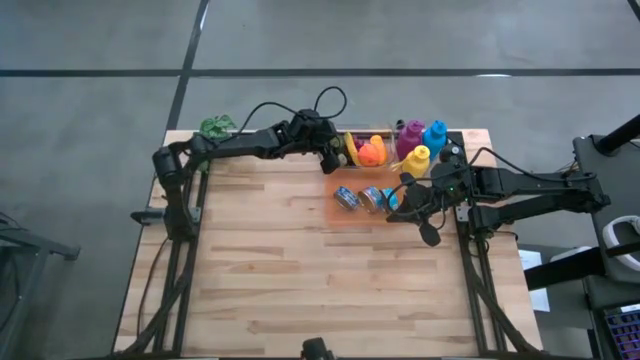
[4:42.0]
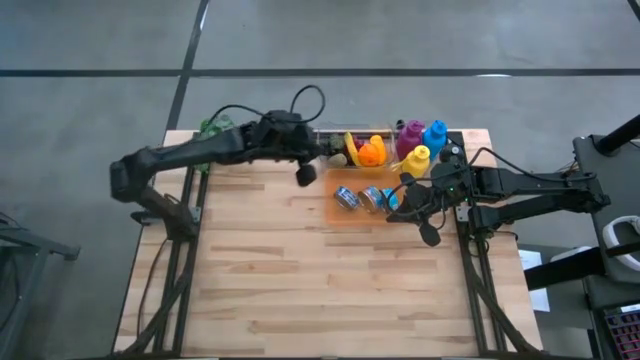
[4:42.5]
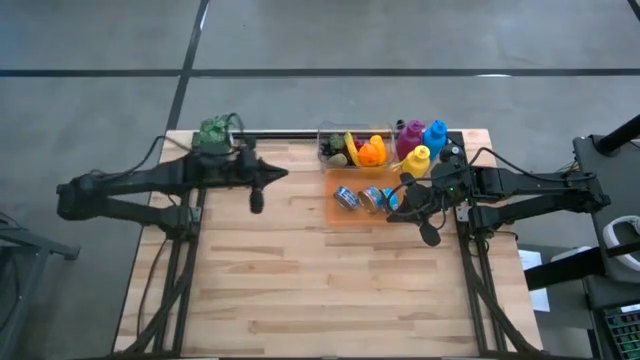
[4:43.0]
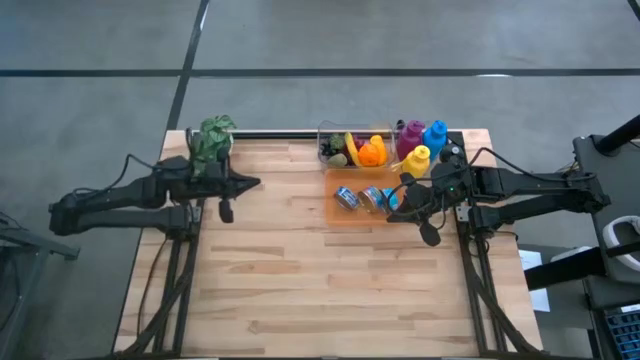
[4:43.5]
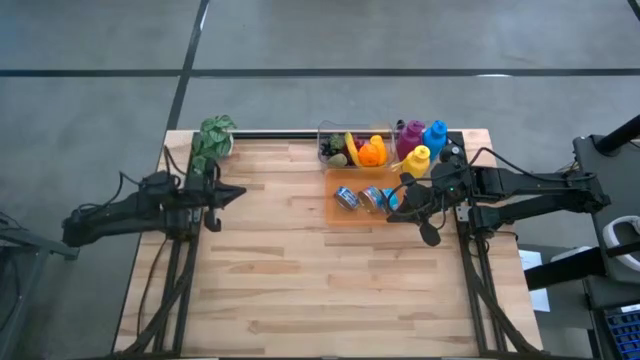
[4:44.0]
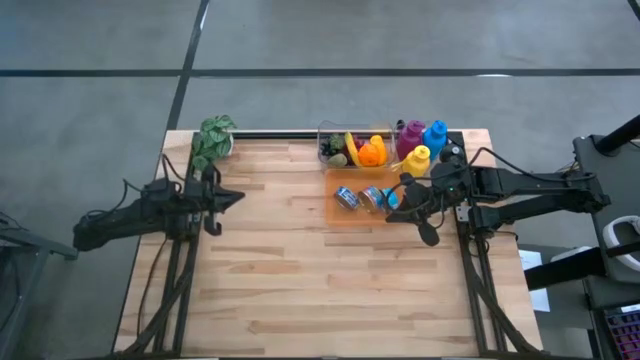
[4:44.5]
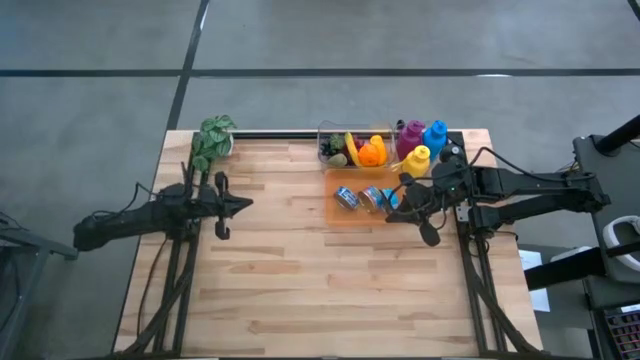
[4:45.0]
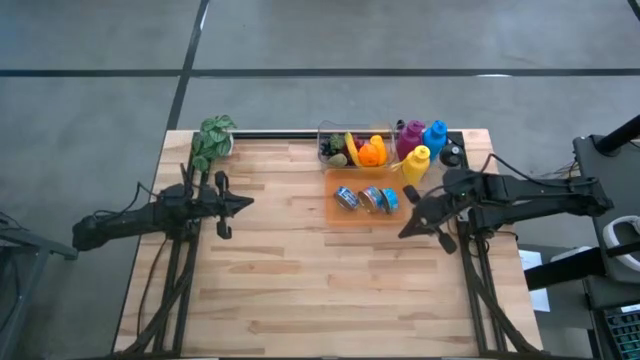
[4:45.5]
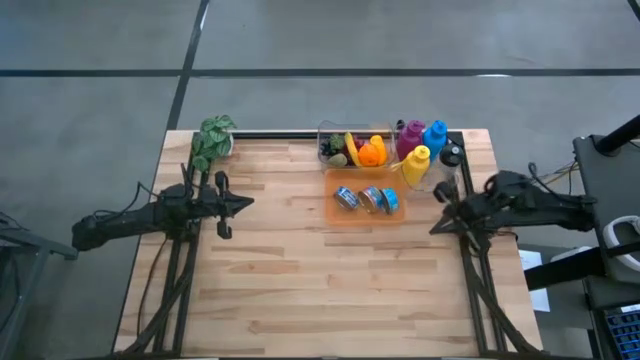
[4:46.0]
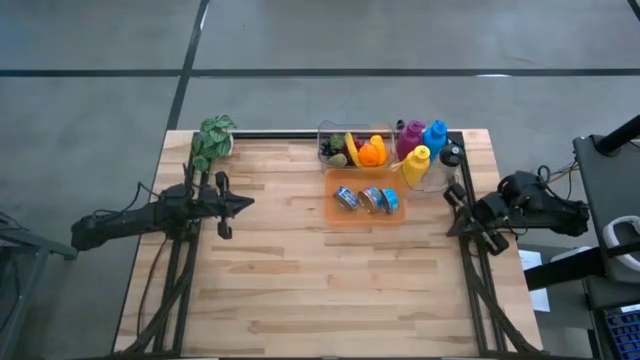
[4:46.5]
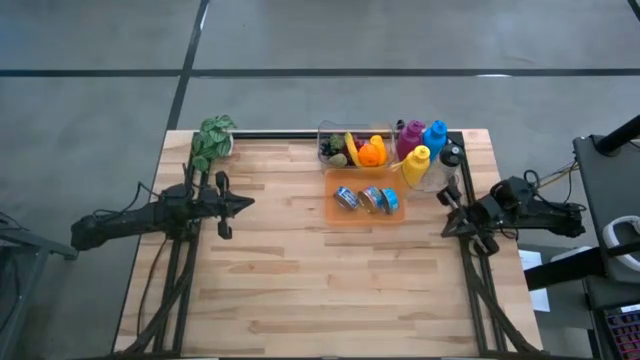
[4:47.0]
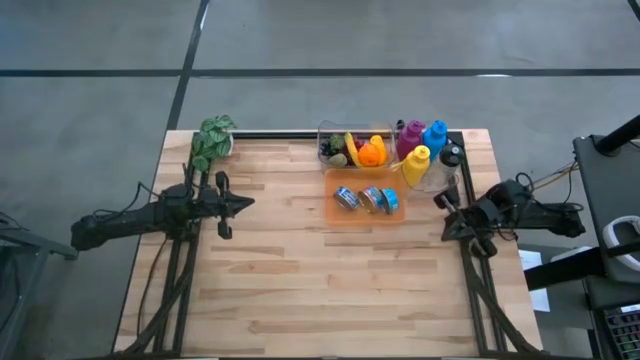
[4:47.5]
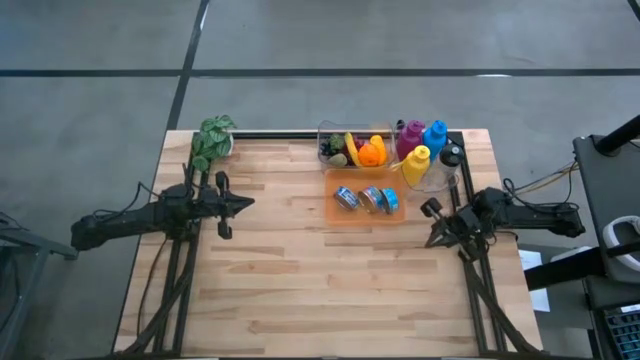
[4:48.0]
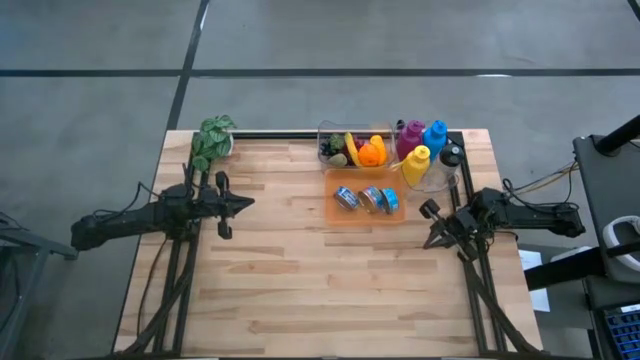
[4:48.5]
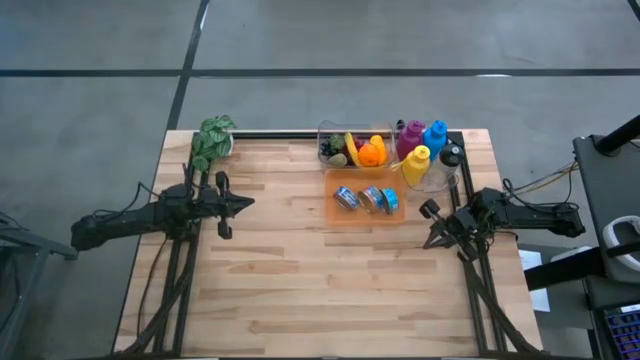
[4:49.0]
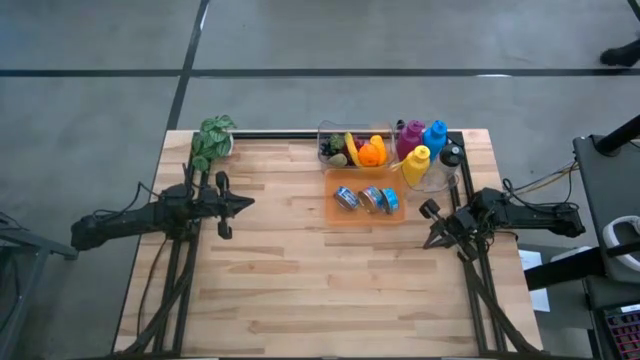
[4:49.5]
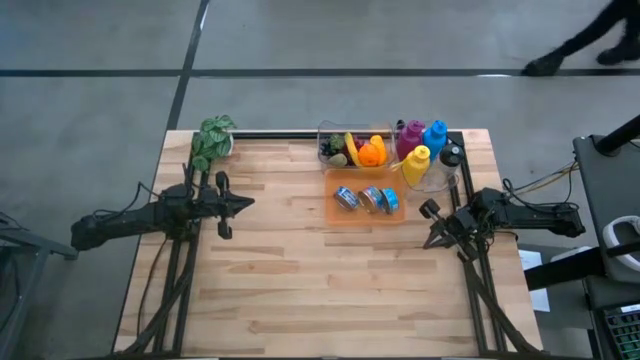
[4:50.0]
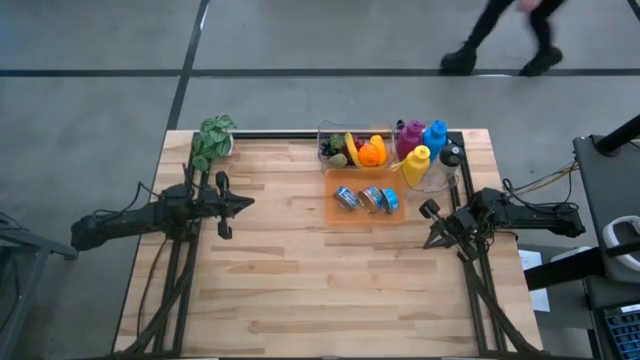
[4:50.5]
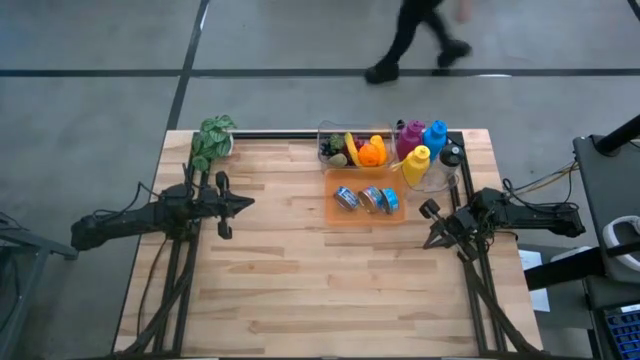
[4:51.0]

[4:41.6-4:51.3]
Task: Pick & Place Food Item
Return to Home Position

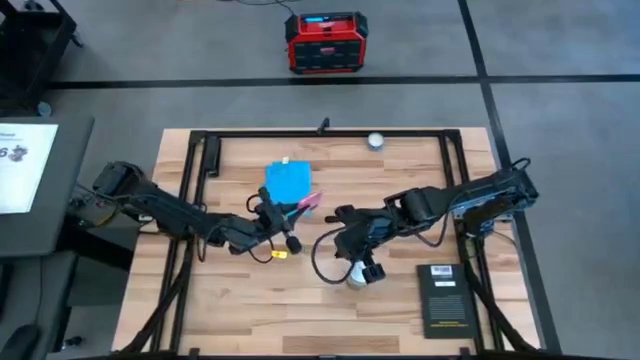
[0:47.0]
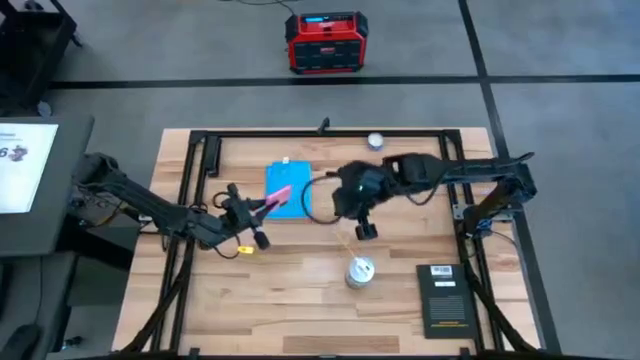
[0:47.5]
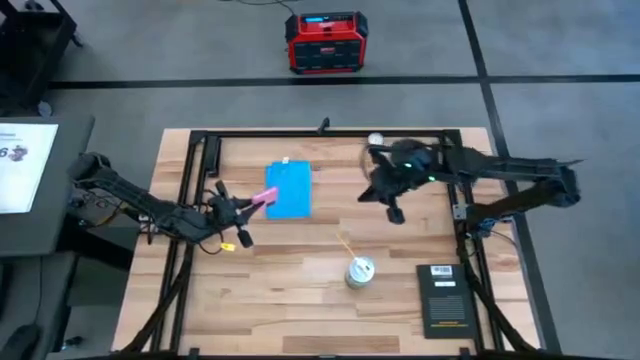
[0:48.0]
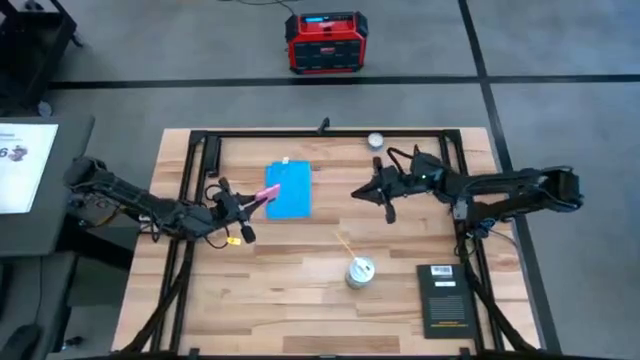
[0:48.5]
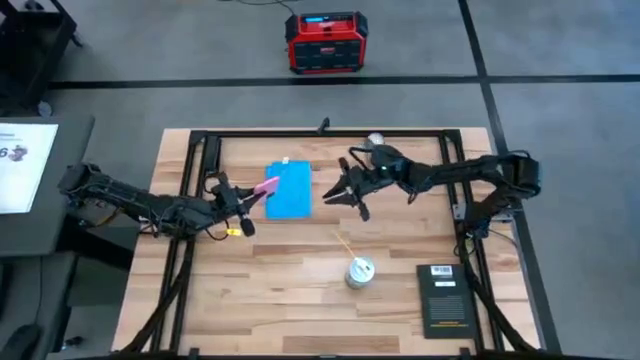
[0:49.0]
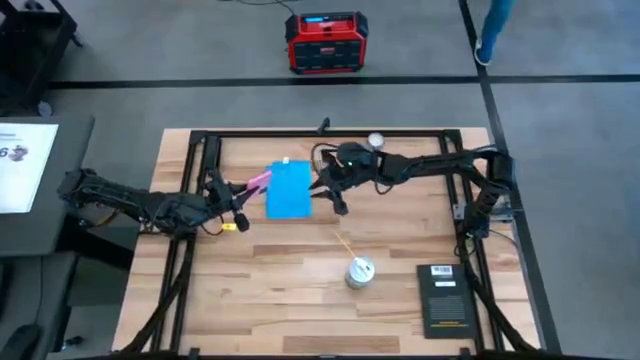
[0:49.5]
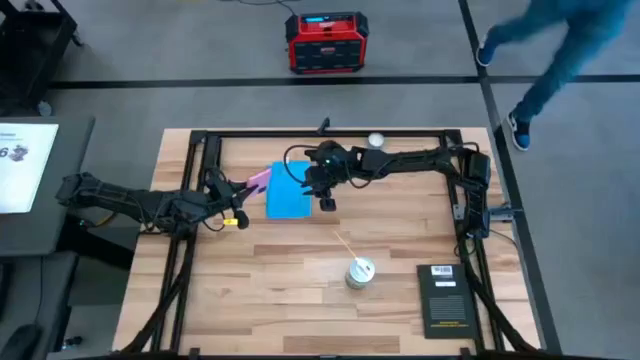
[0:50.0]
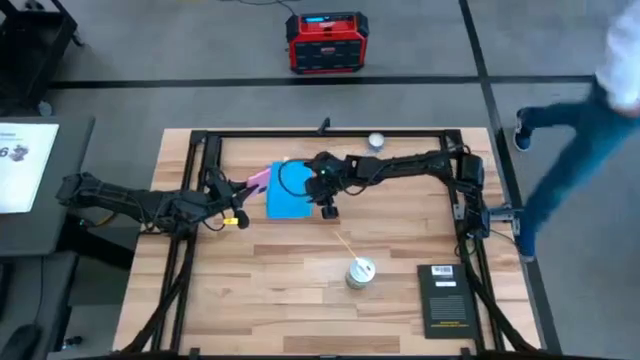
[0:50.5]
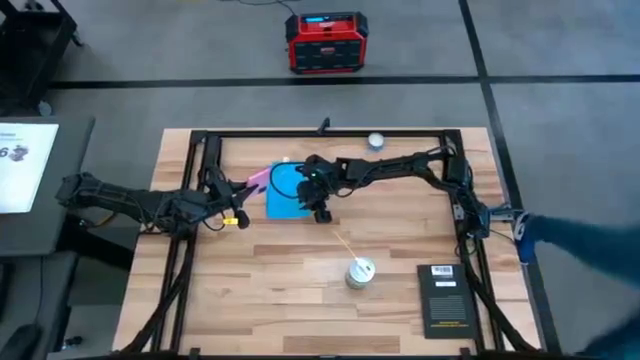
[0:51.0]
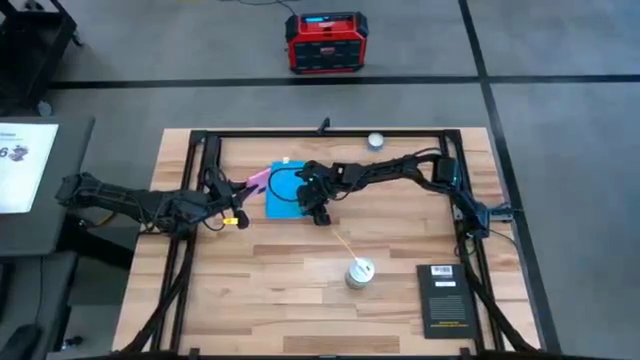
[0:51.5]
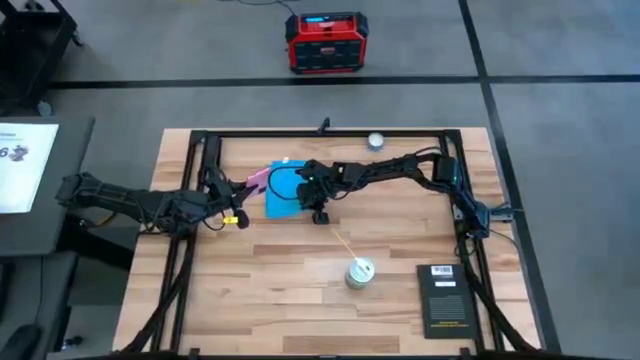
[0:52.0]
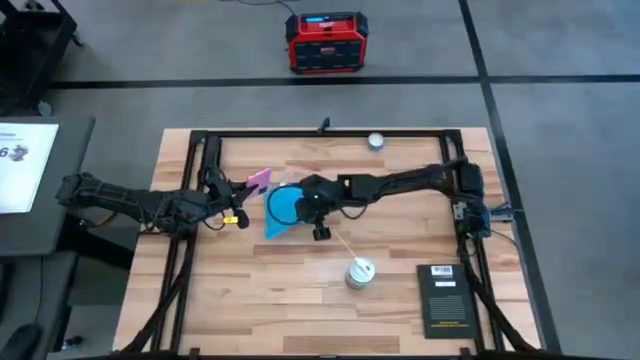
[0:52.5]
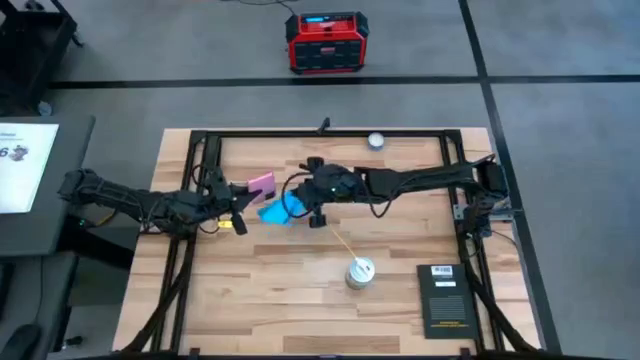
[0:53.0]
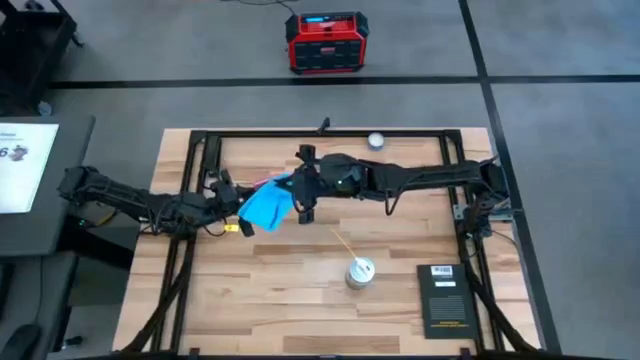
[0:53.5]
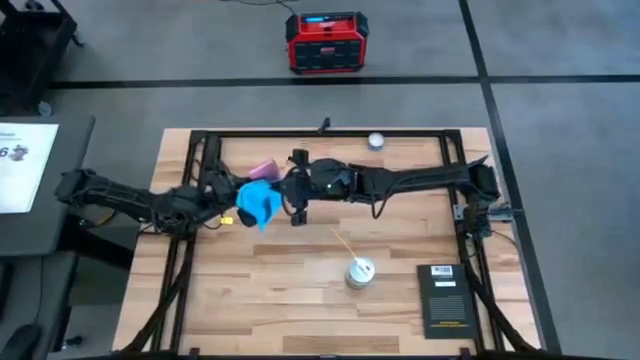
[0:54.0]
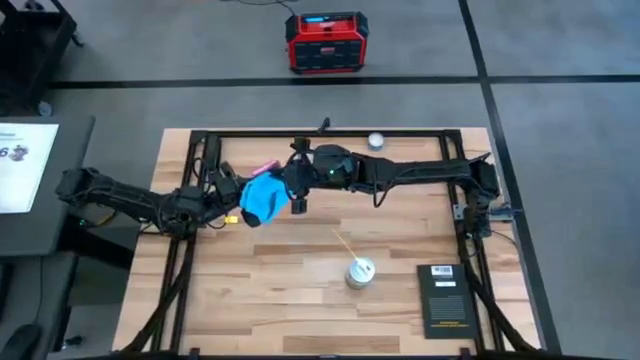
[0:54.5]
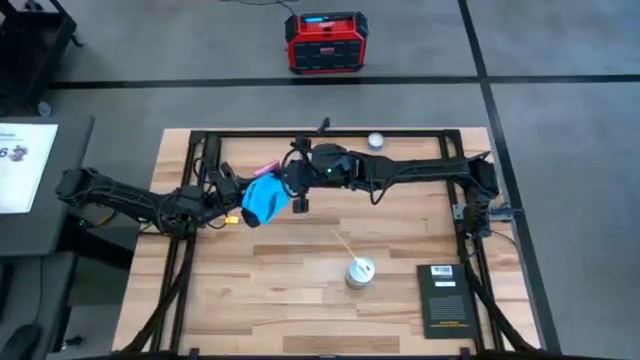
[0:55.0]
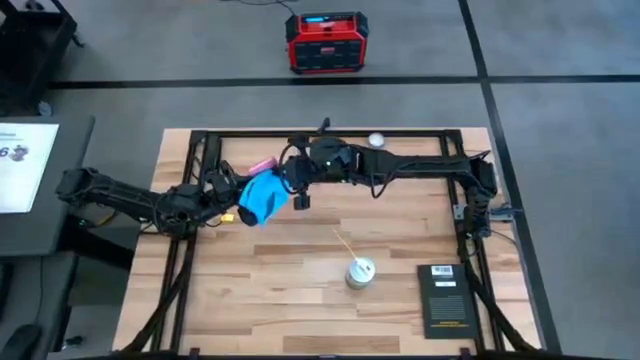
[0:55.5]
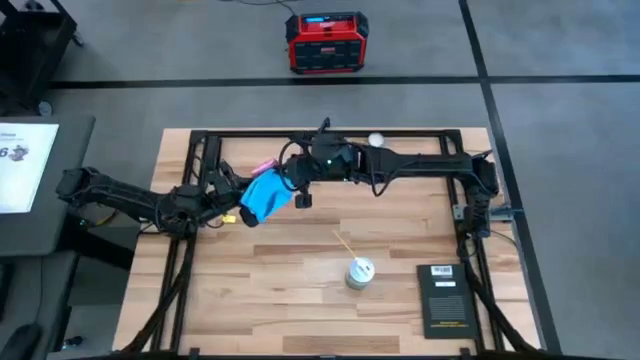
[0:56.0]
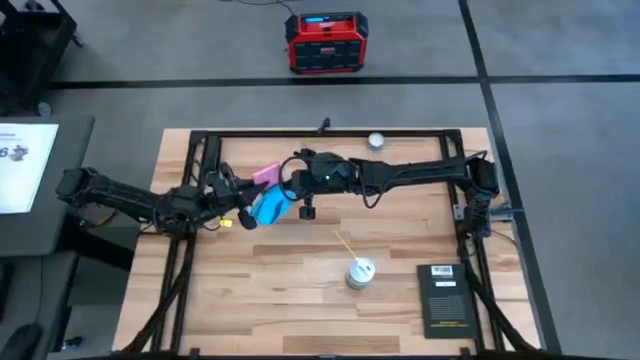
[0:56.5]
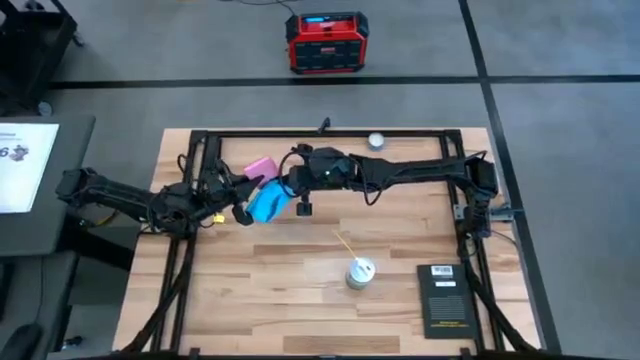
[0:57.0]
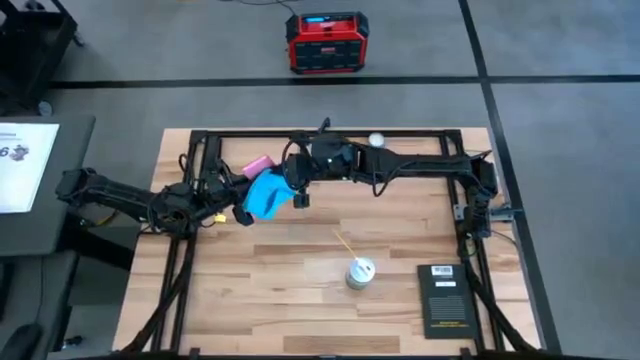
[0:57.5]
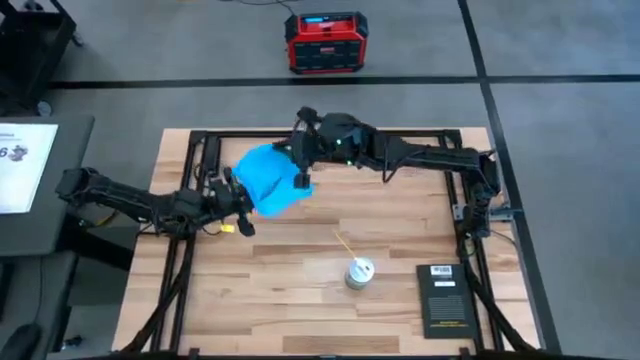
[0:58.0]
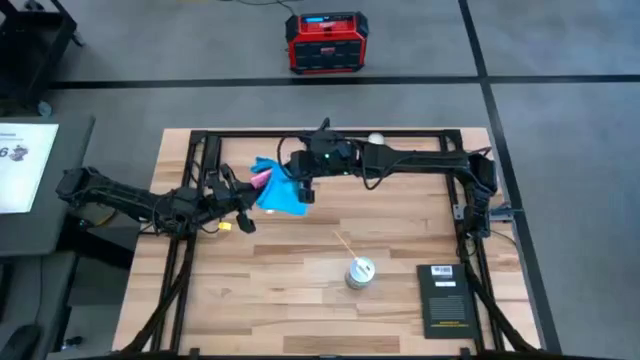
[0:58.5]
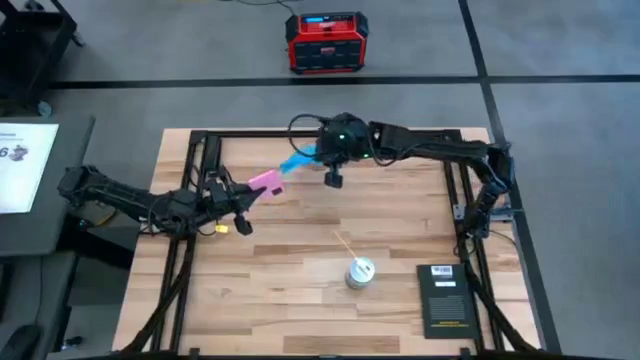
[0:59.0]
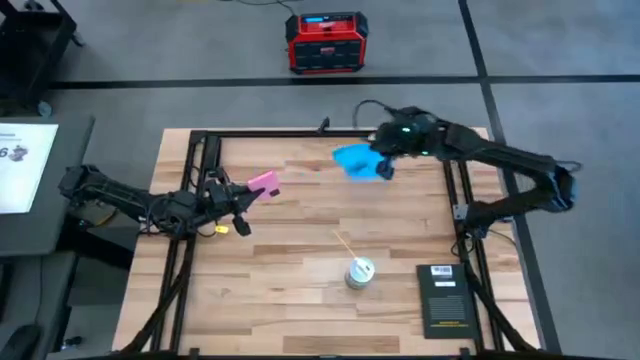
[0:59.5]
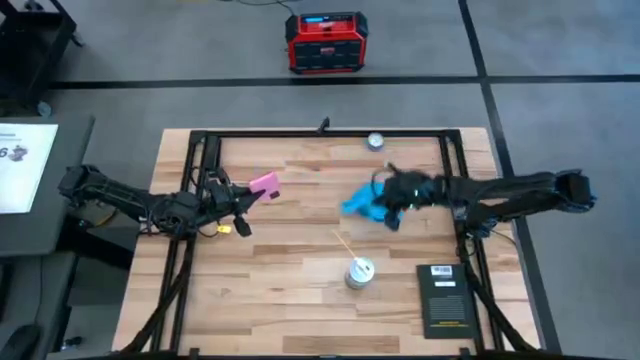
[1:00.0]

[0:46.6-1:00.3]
Task: Apply microfiber cloth
Wipe the device with a microfiber cloth
